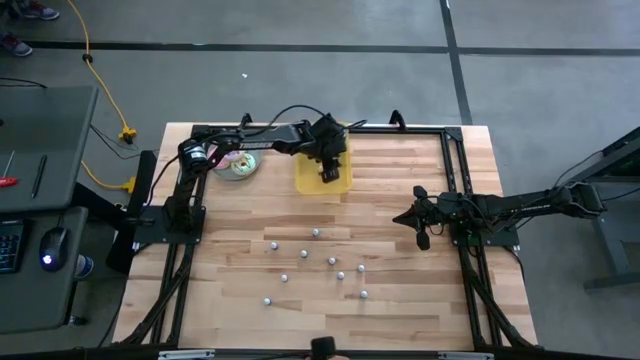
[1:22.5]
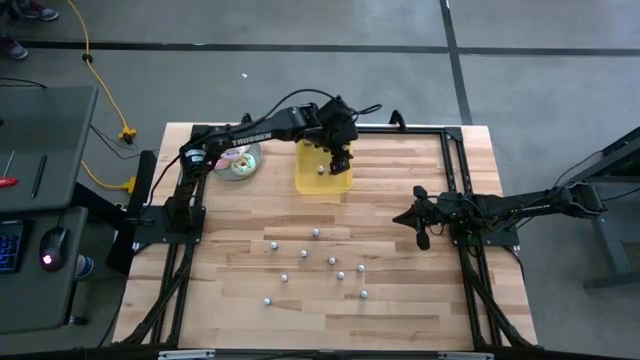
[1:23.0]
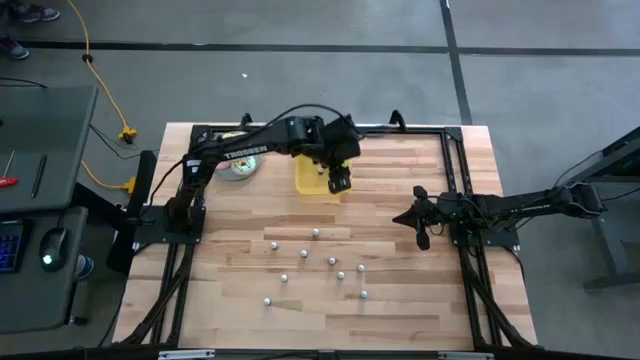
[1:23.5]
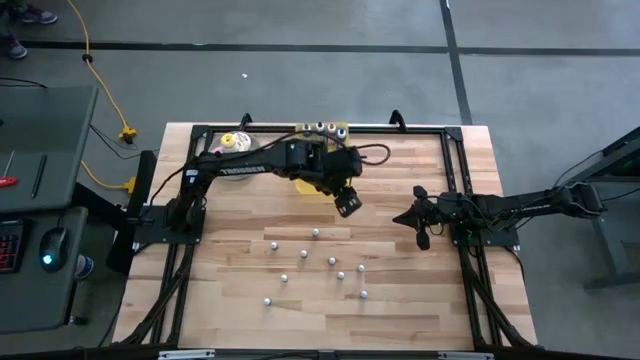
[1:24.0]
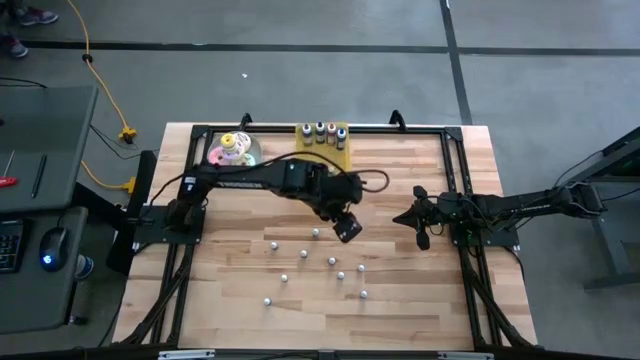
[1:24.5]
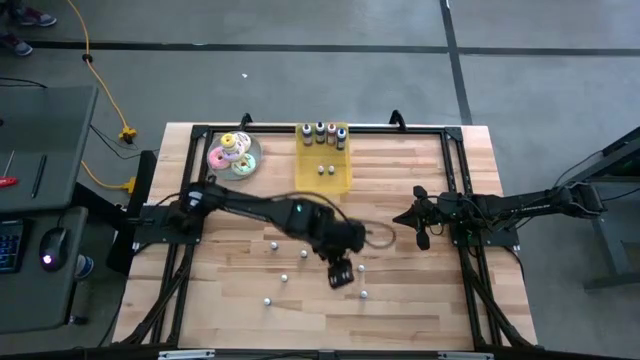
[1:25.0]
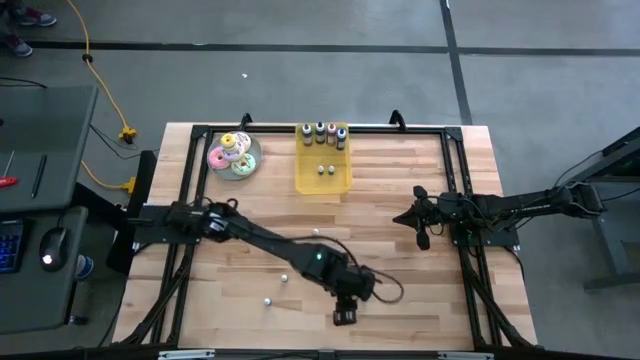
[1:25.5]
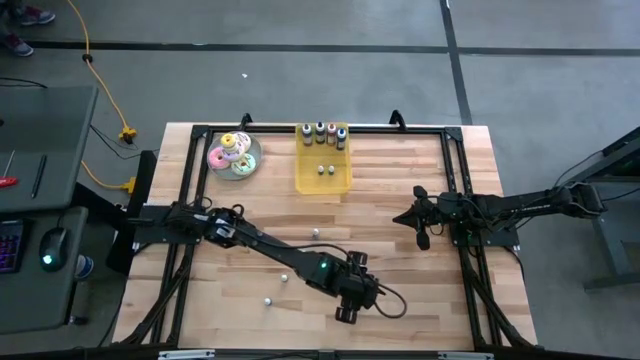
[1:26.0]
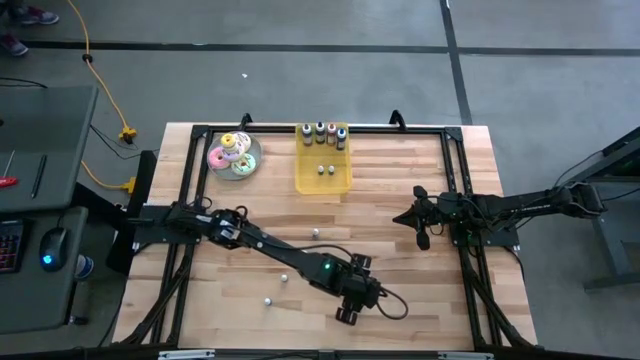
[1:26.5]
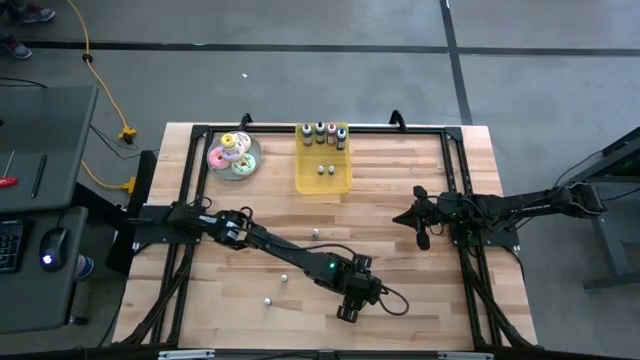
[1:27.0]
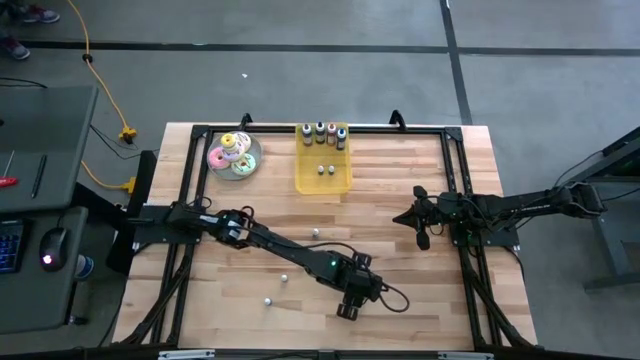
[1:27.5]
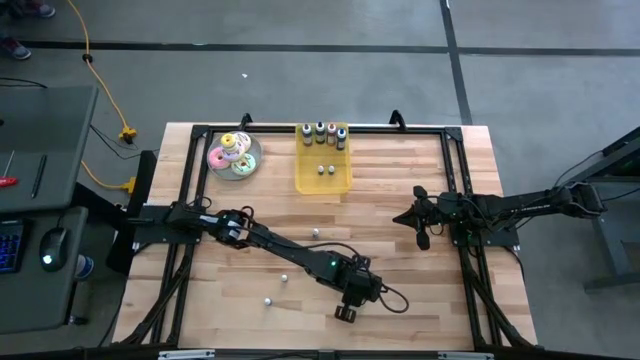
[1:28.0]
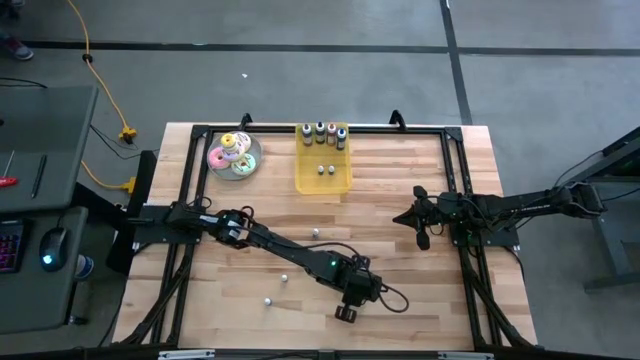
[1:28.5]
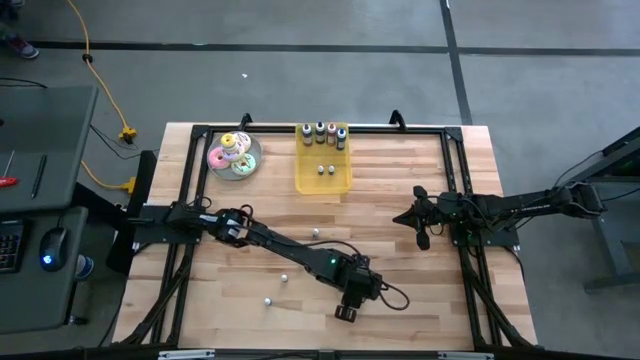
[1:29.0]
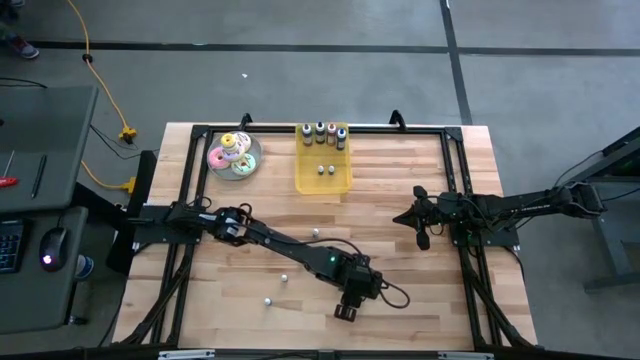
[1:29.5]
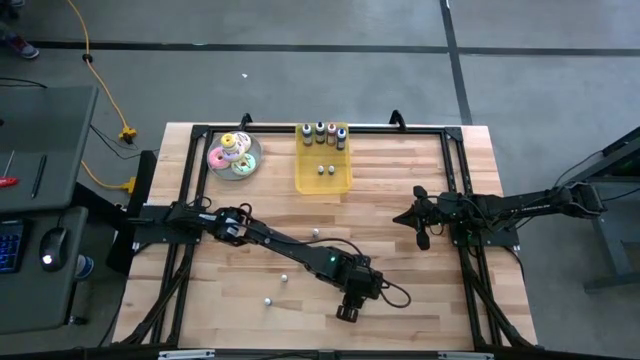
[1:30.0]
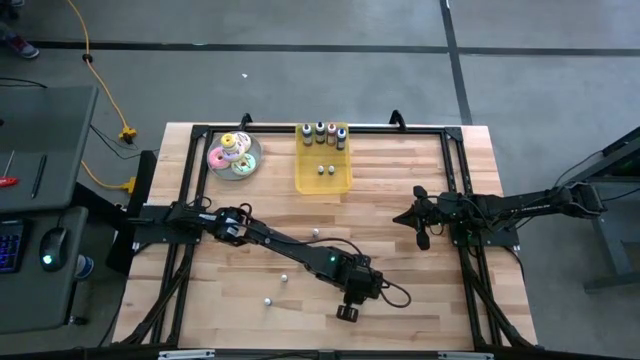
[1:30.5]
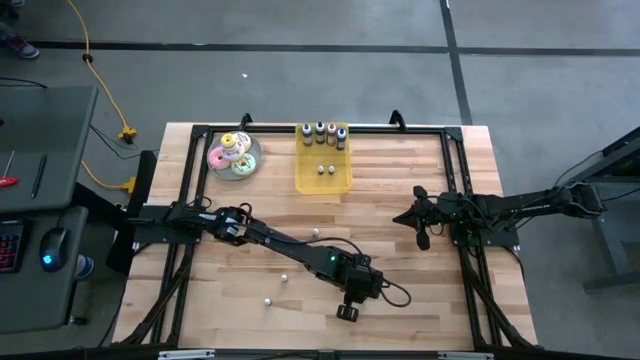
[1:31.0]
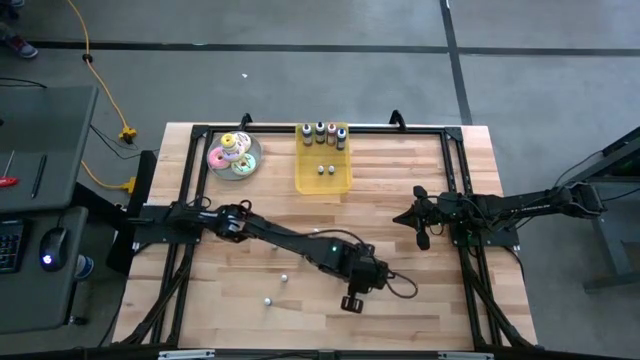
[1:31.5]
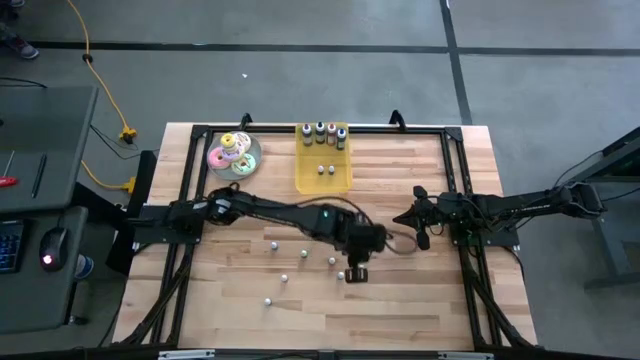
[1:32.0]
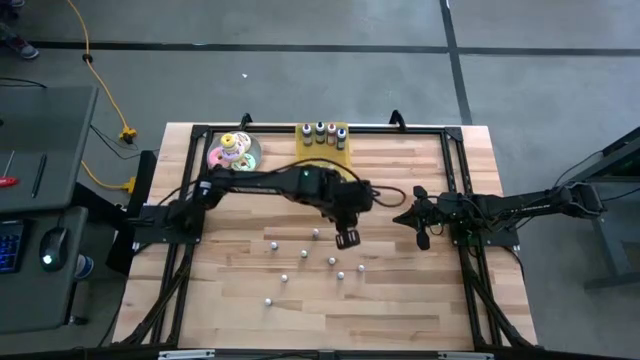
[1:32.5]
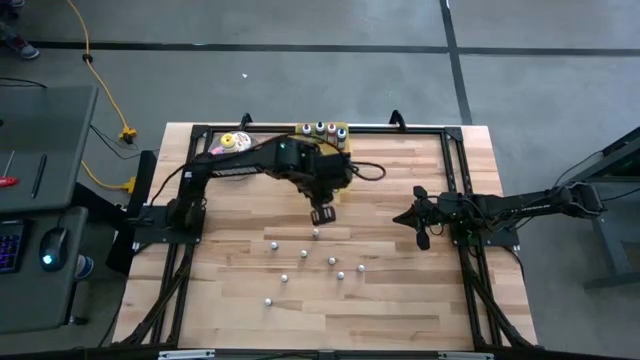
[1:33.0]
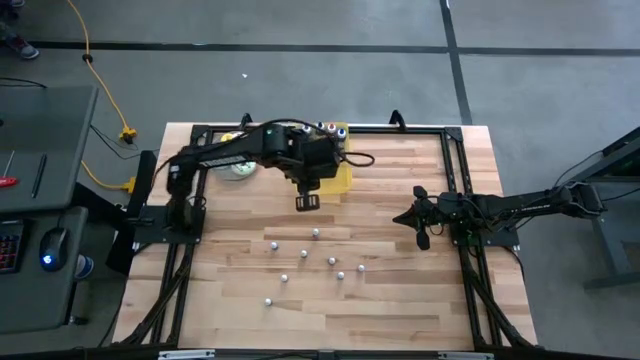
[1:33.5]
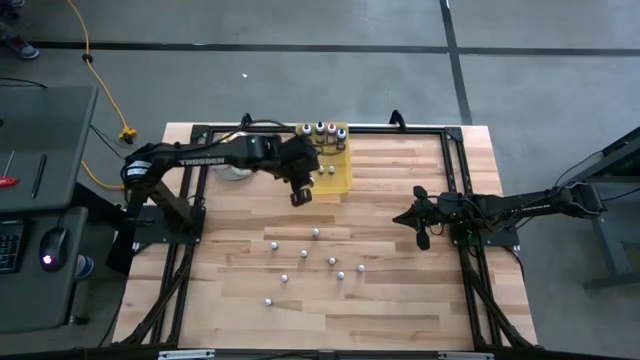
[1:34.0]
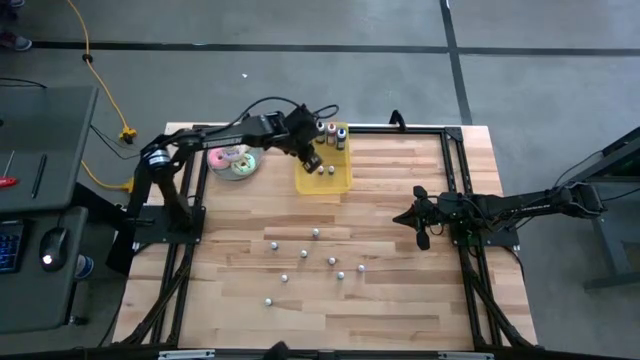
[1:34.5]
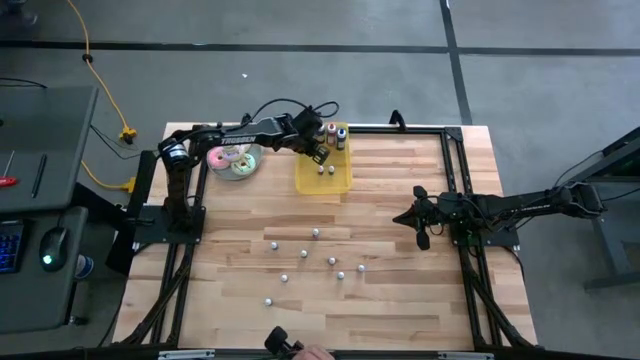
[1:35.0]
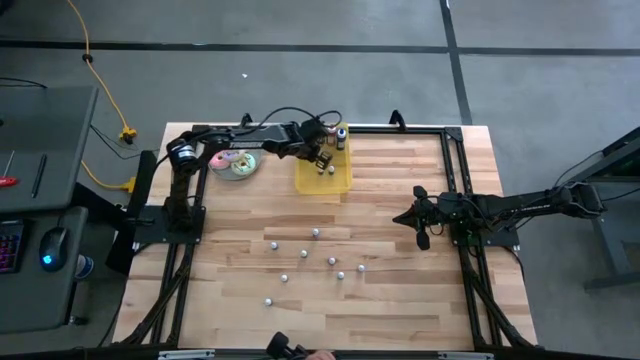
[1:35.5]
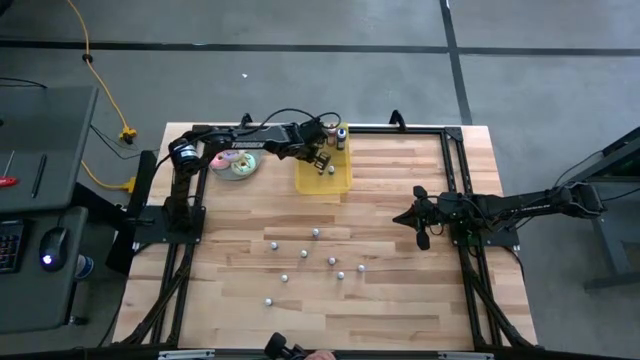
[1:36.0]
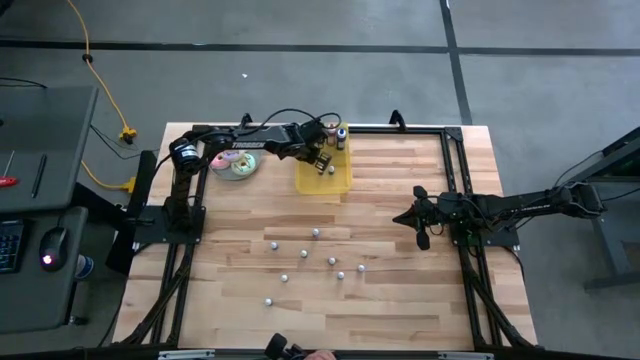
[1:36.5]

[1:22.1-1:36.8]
Task: Pick & Place food coloring
Put the bottom small red food coloring bottle into the yellow bin

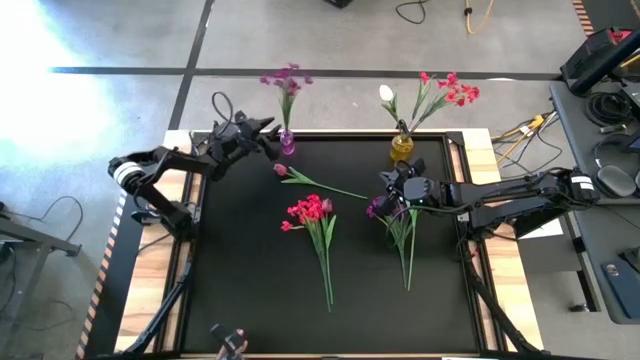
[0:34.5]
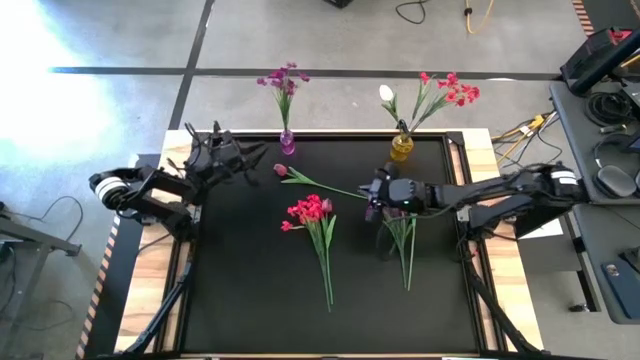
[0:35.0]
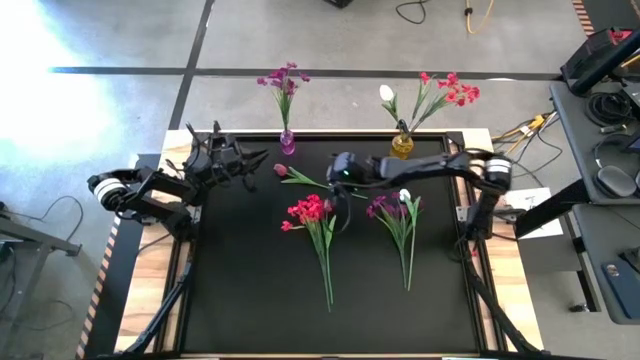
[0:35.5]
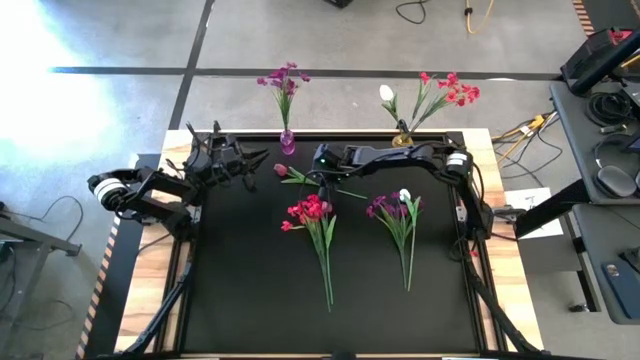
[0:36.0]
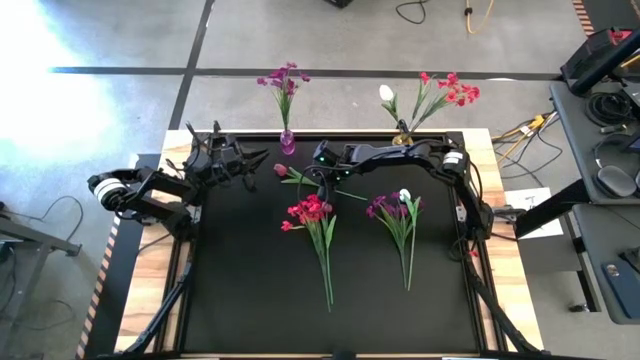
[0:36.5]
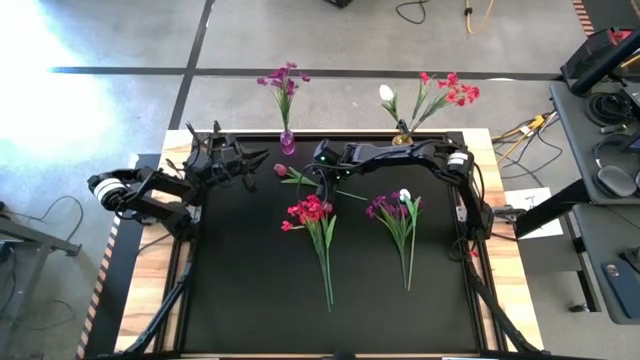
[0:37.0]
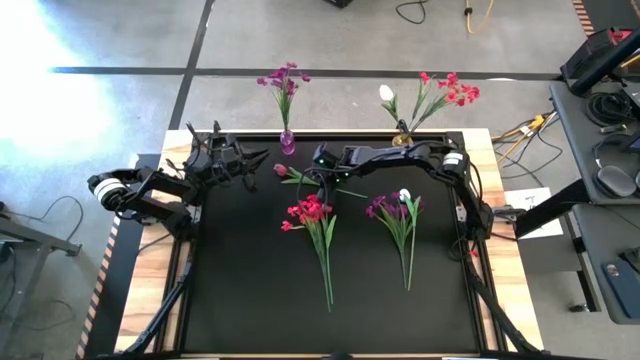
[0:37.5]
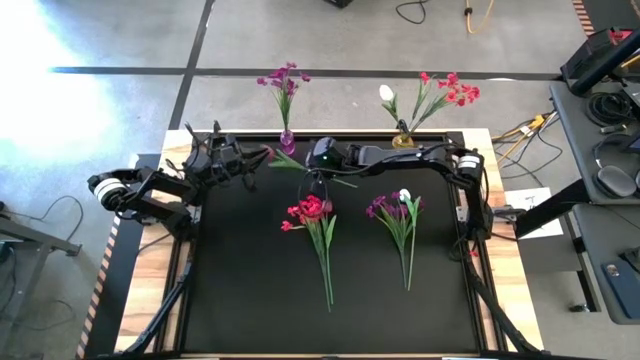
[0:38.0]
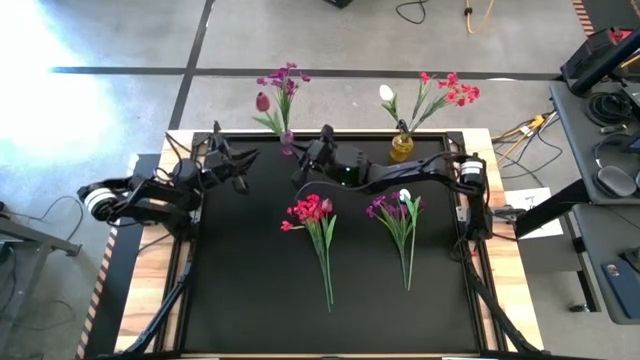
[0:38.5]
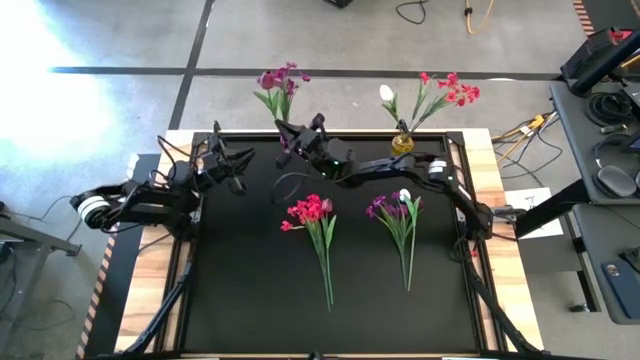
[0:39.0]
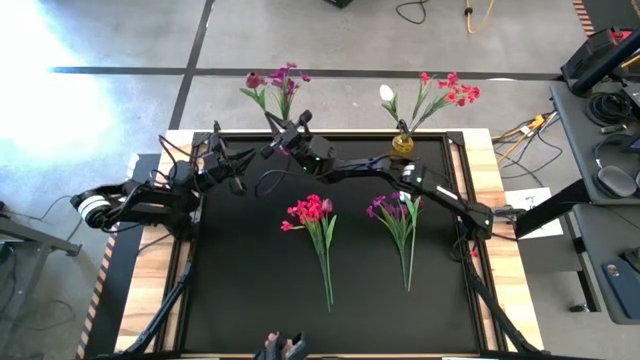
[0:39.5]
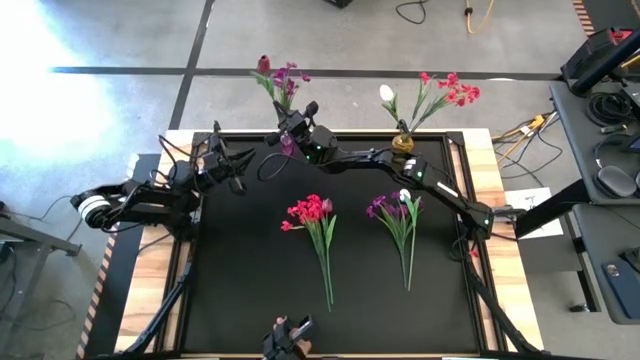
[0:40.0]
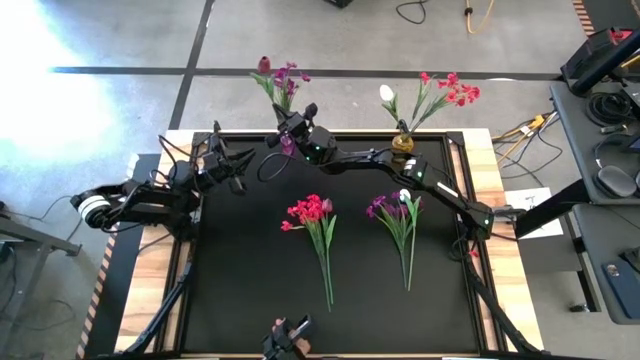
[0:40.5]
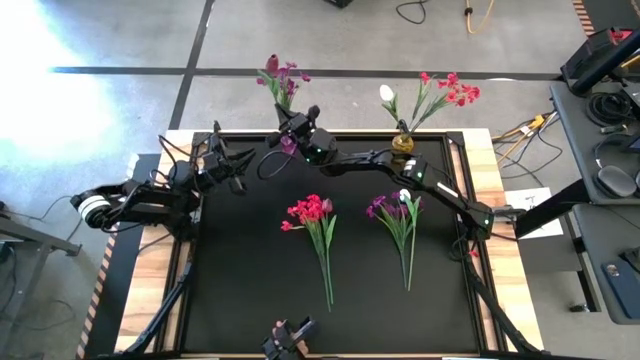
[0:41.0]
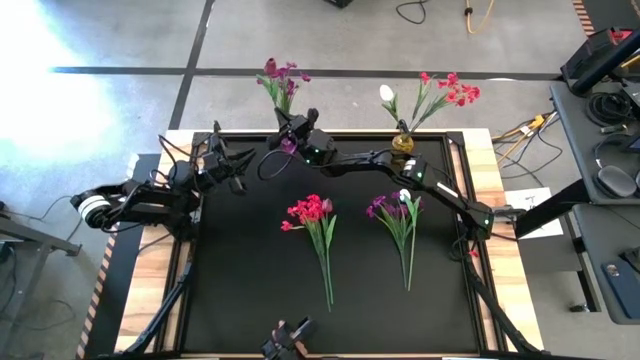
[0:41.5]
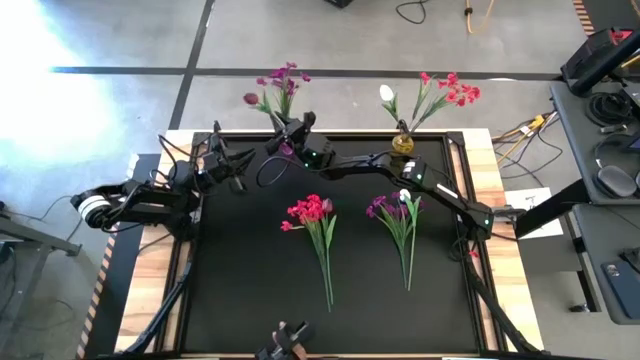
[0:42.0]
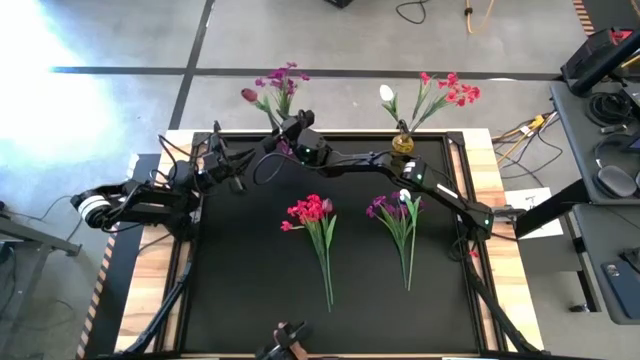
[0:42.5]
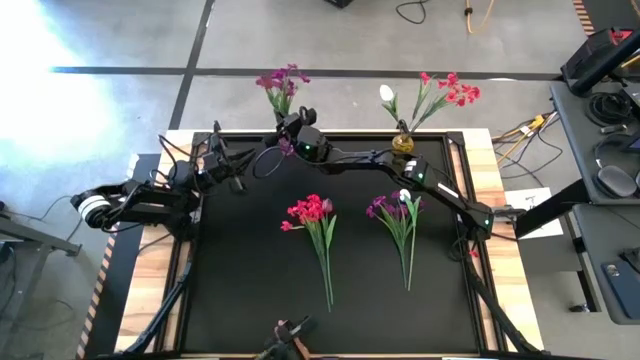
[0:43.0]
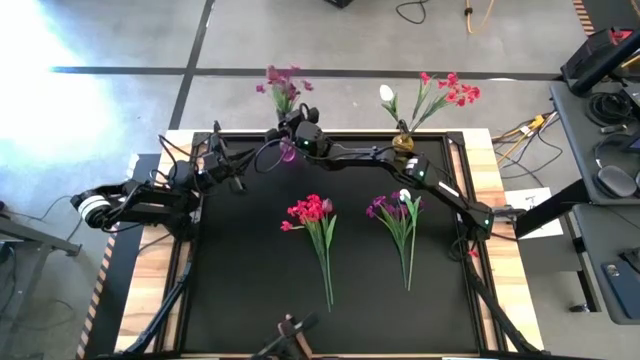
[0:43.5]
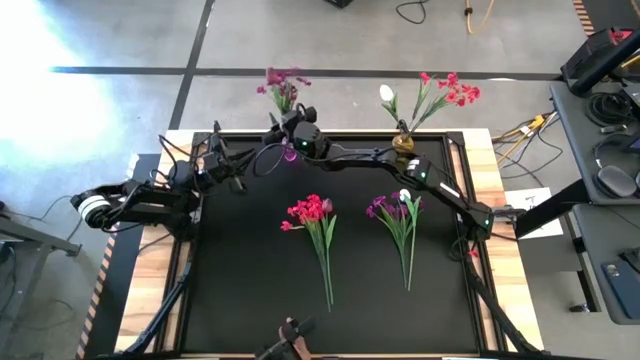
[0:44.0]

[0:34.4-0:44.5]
Task: Sort flowers into vase by color
Put the top purple flower into the purple vase
